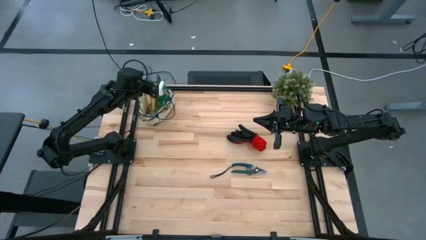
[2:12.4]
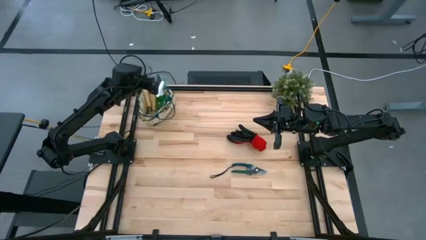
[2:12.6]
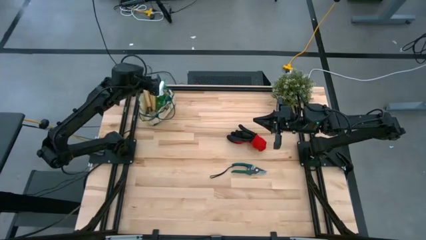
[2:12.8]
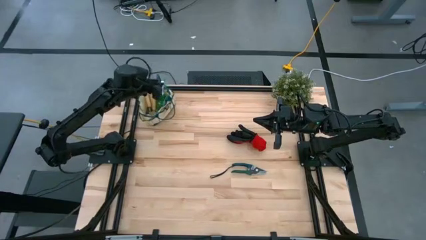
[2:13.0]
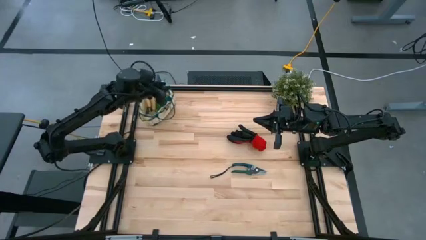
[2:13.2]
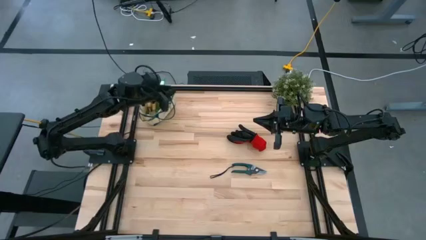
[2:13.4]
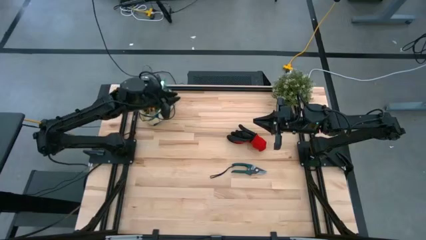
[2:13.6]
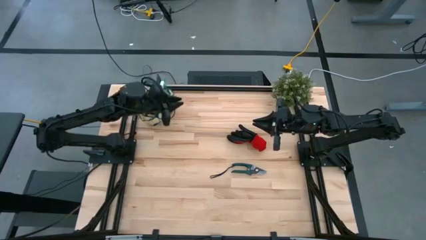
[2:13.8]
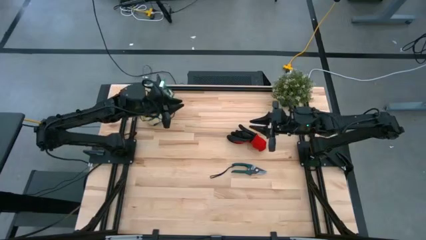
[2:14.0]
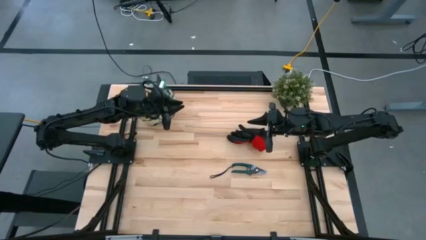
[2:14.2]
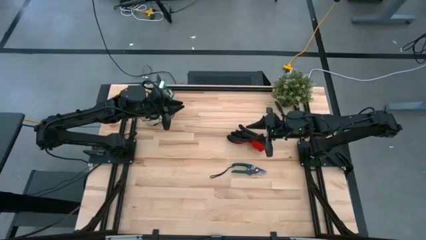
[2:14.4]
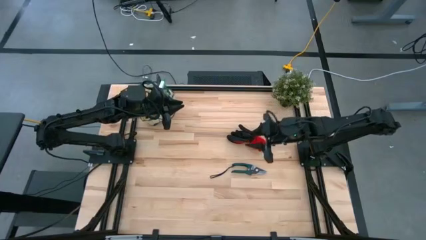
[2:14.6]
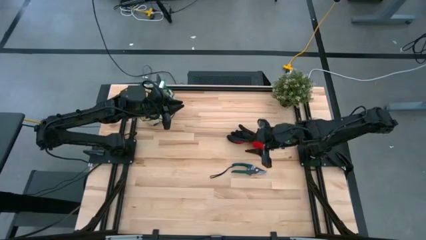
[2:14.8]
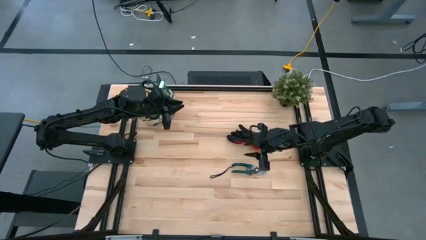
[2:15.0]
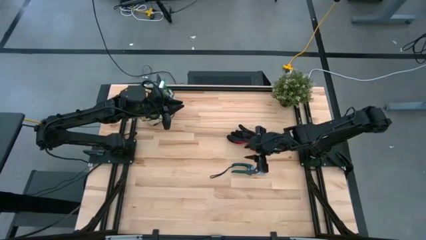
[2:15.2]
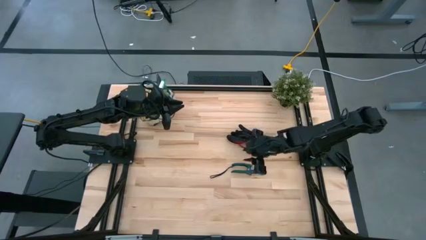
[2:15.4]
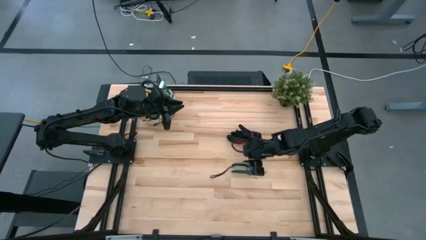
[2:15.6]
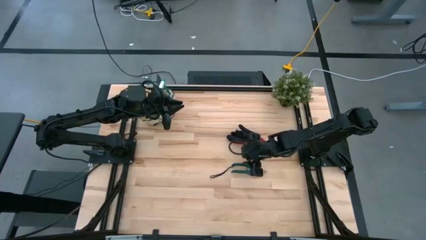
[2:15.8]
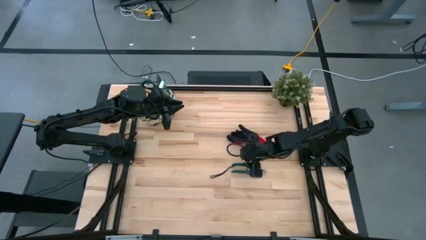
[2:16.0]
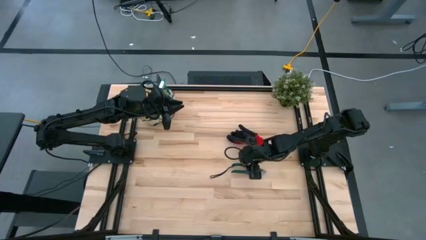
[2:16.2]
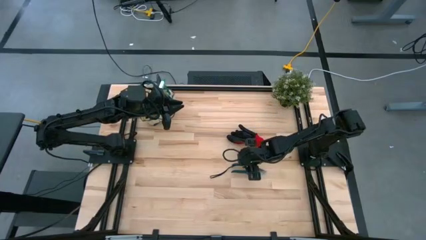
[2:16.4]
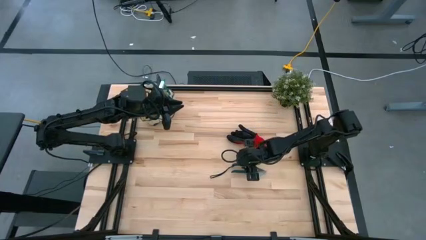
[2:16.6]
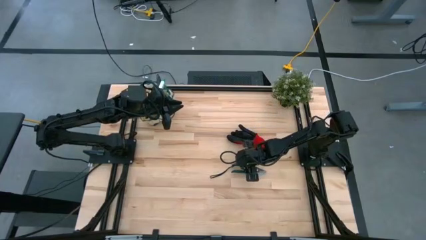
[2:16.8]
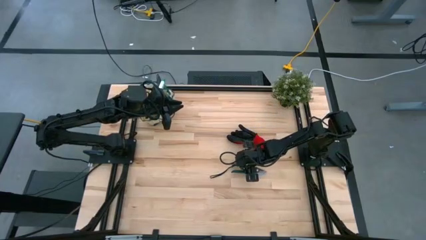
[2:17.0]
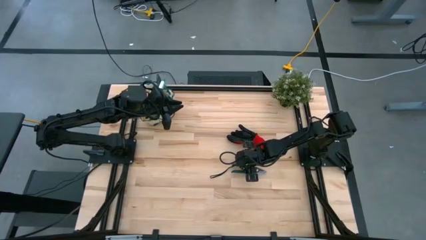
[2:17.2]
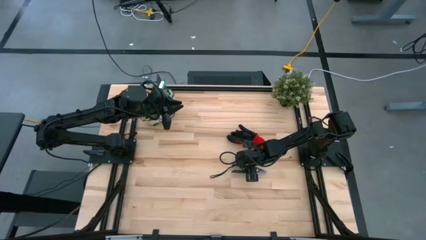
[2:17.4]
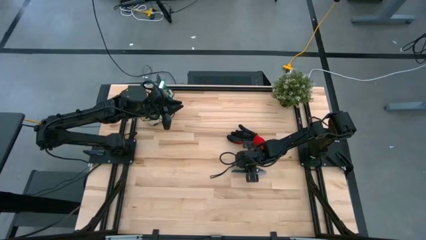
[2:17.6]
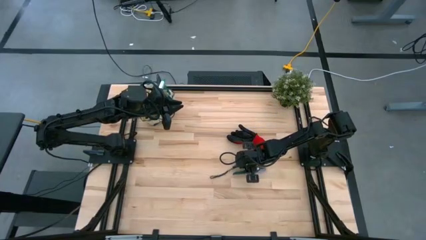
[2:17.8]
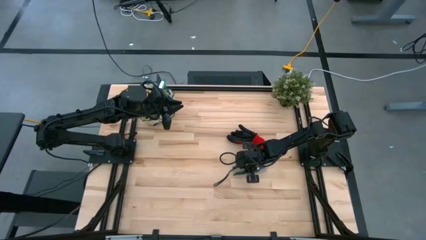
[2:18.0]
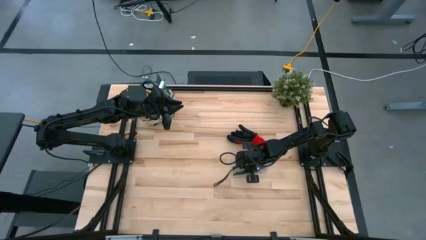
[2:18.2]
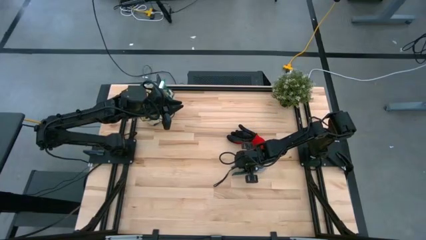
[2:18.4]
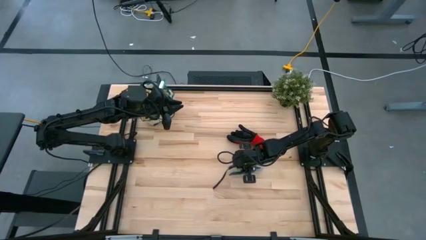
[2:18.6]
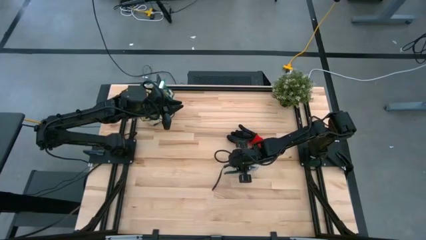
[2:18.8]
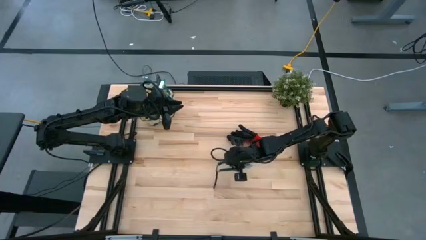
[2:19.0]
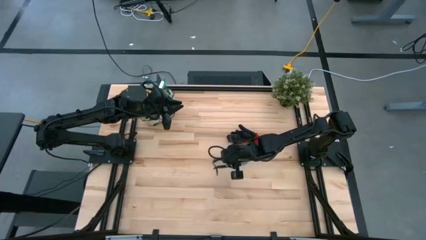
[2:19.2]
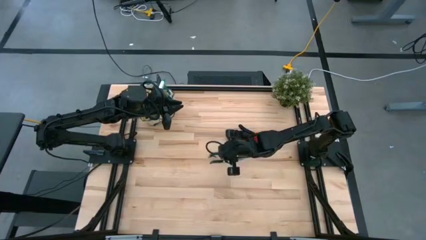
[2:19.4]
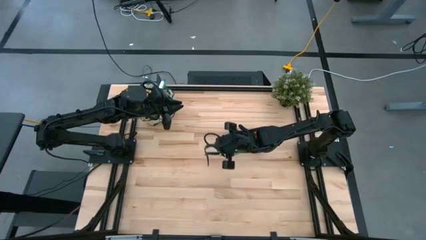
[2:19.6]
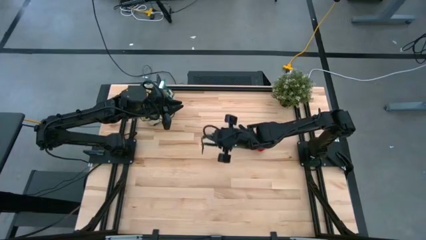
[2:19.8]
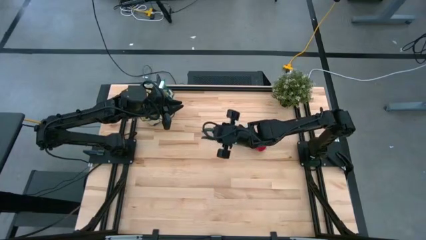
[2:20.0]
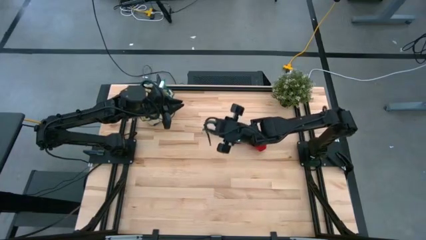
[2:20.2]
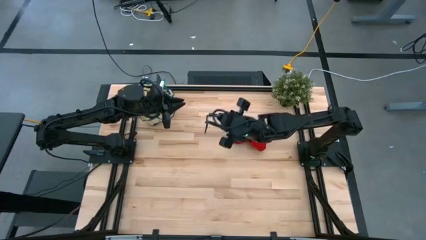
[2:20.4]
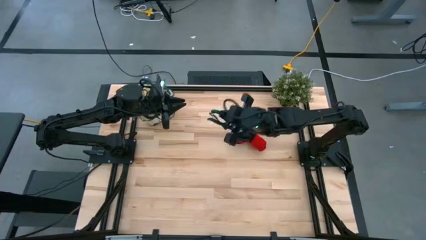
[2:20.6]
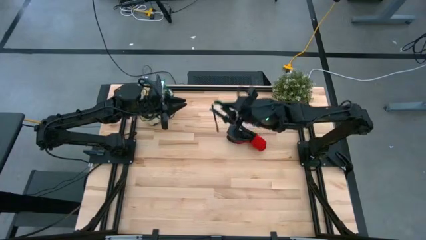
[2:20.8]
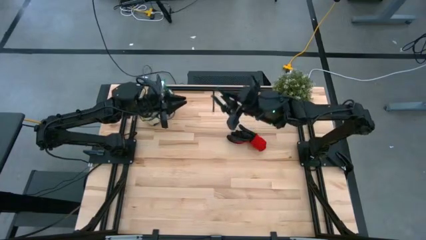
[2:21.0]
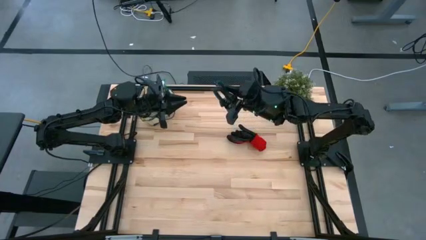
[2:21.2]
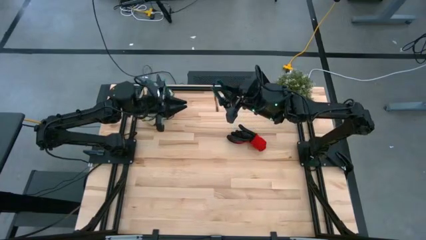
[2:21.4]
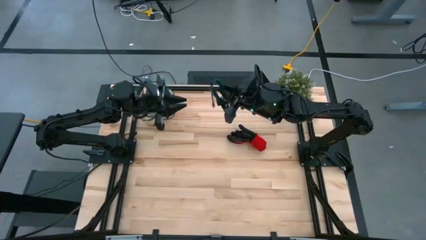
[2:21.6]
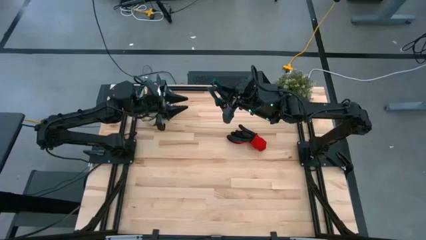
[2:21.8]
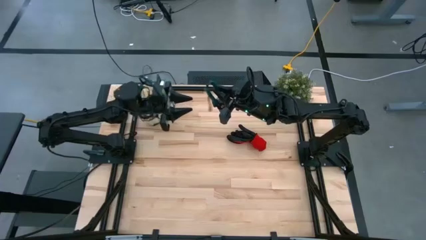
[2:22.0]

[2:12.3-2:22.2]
Task: Pick & Place Garden tools in Gardening bag
Put the green pruning shear into the gardening bag

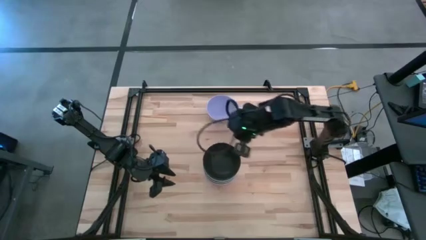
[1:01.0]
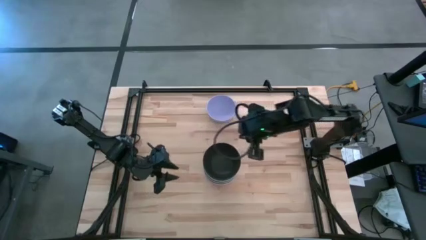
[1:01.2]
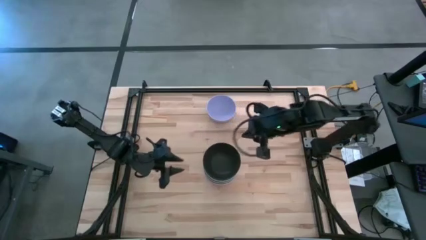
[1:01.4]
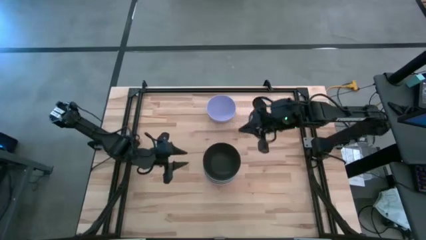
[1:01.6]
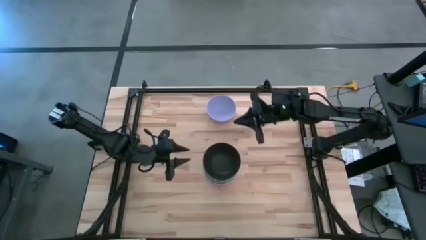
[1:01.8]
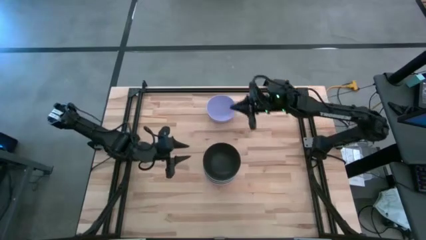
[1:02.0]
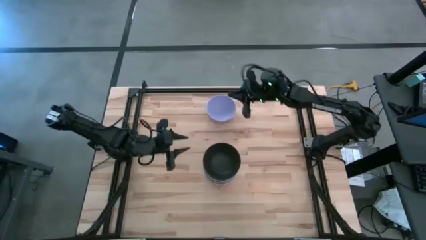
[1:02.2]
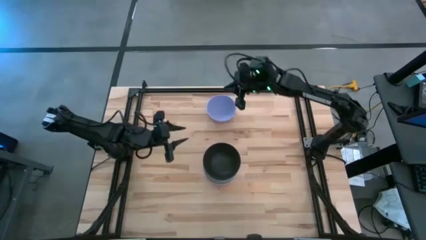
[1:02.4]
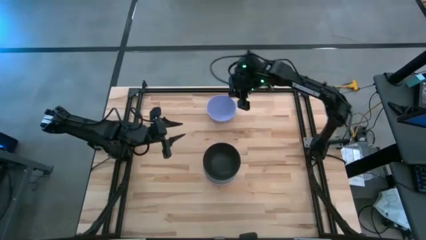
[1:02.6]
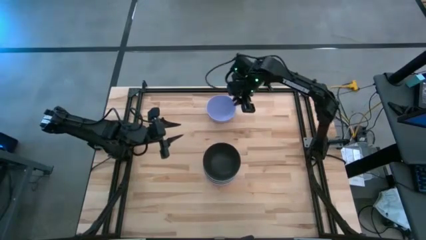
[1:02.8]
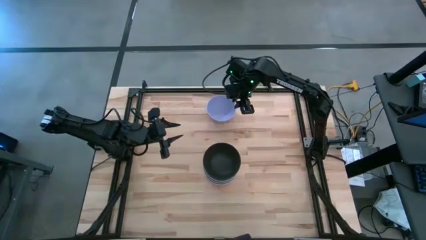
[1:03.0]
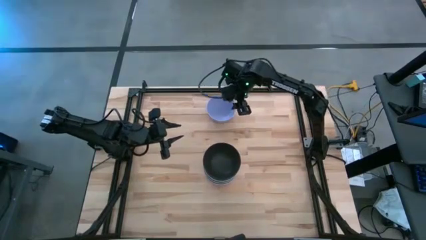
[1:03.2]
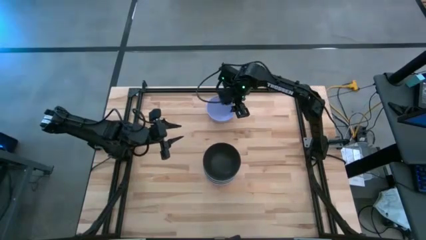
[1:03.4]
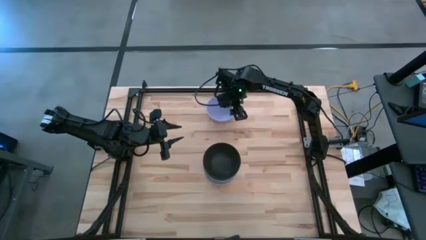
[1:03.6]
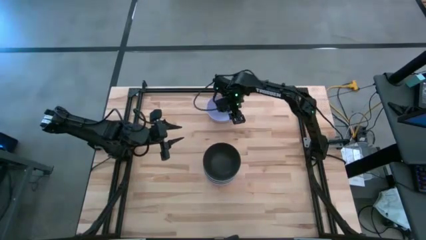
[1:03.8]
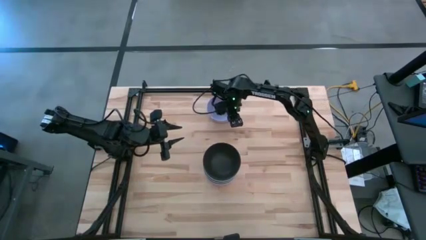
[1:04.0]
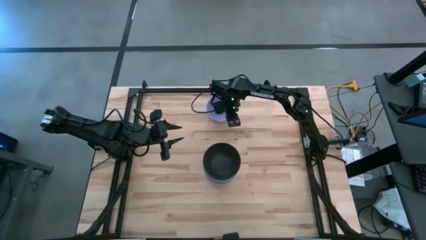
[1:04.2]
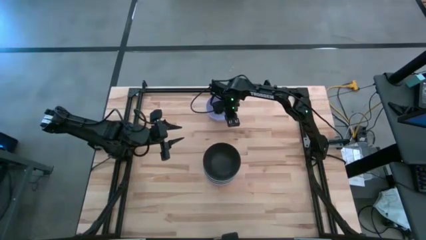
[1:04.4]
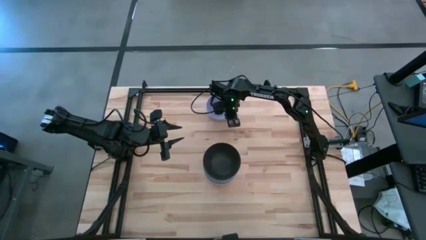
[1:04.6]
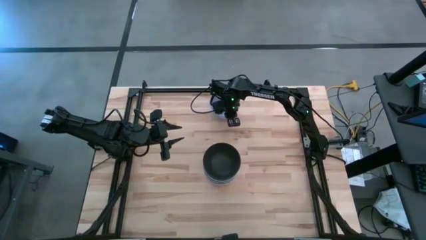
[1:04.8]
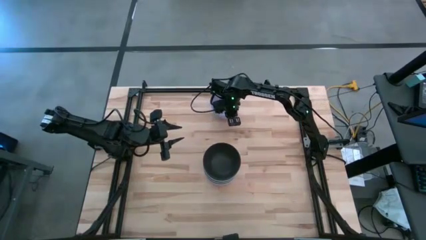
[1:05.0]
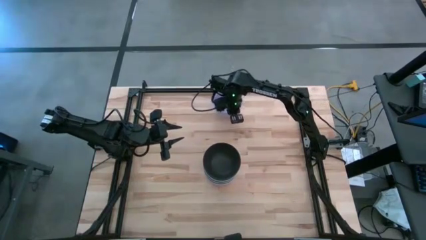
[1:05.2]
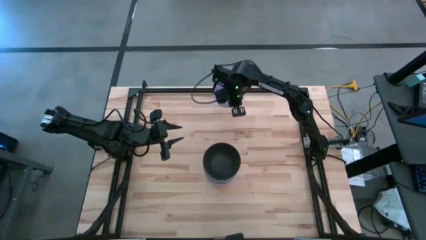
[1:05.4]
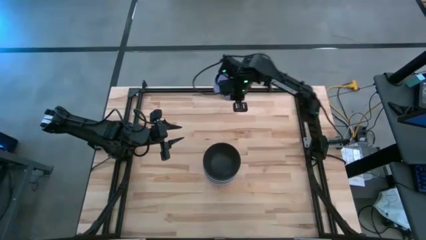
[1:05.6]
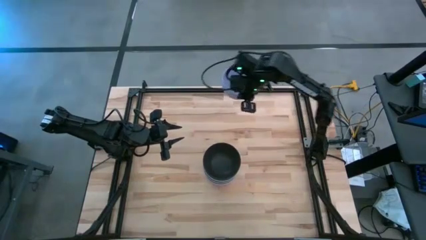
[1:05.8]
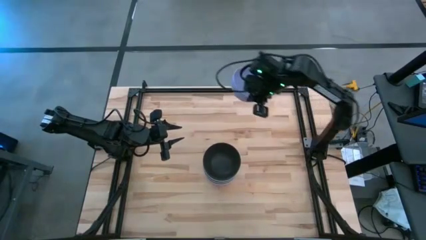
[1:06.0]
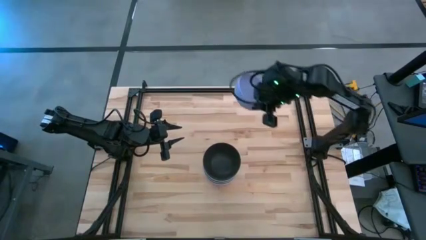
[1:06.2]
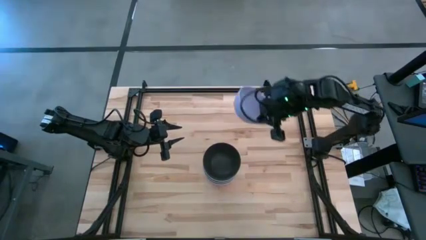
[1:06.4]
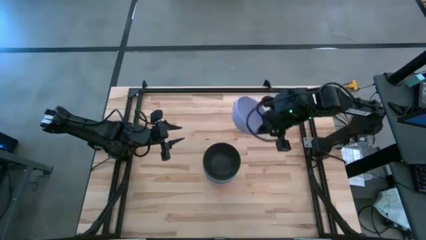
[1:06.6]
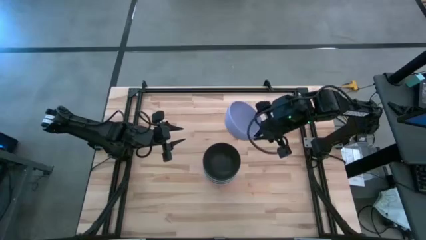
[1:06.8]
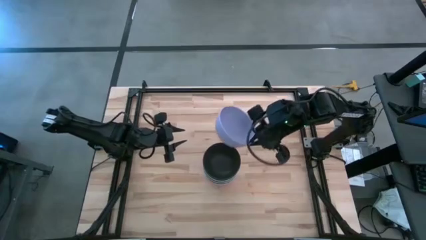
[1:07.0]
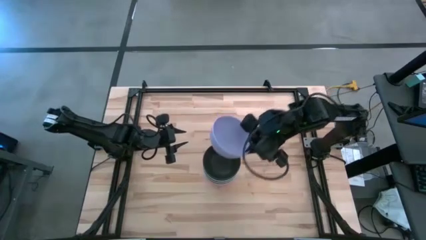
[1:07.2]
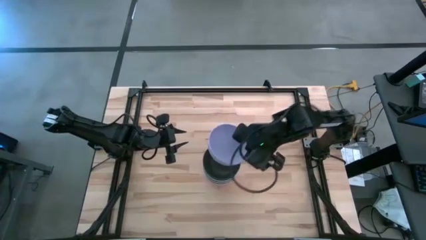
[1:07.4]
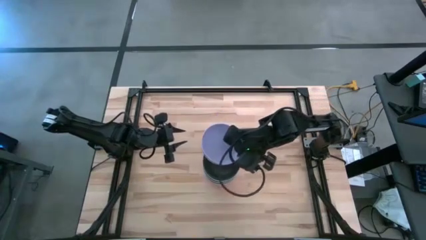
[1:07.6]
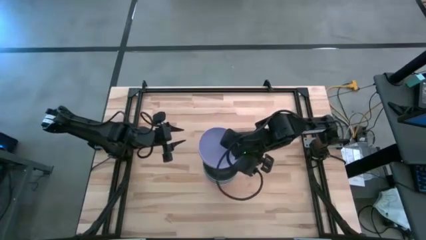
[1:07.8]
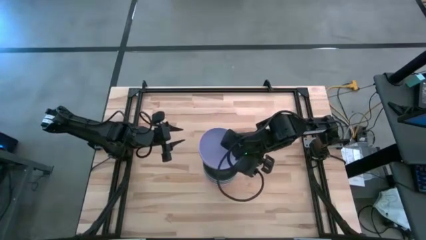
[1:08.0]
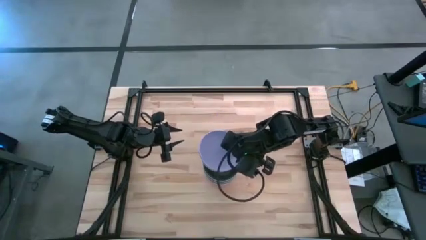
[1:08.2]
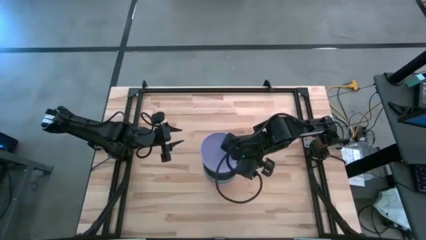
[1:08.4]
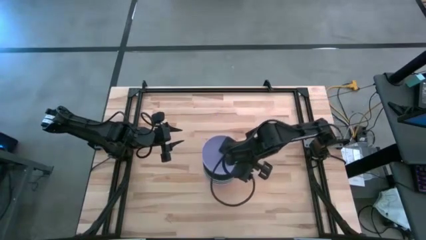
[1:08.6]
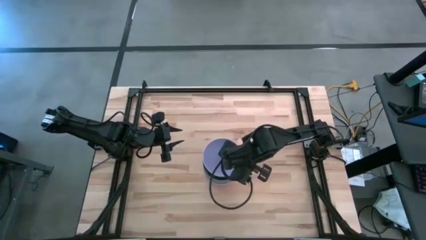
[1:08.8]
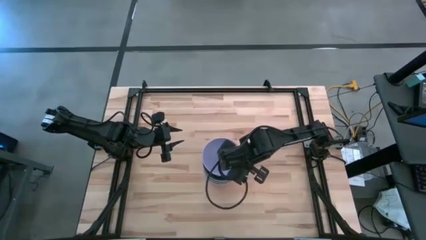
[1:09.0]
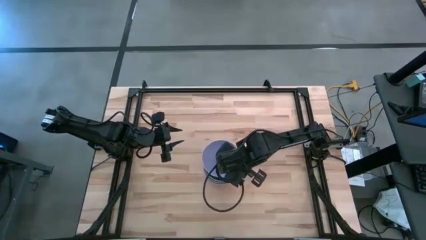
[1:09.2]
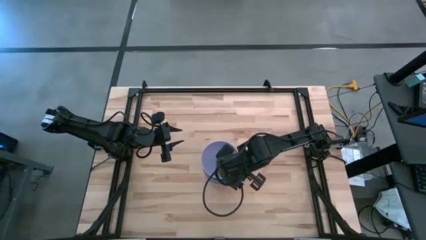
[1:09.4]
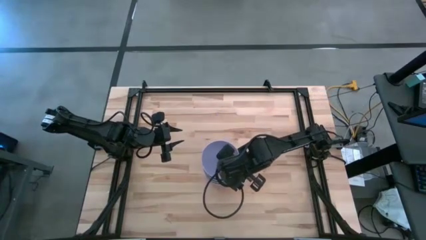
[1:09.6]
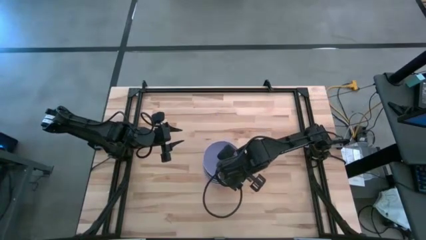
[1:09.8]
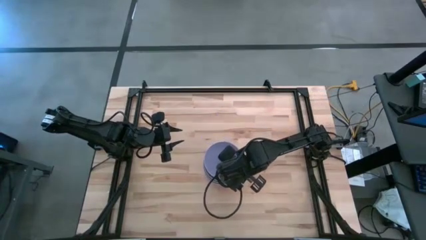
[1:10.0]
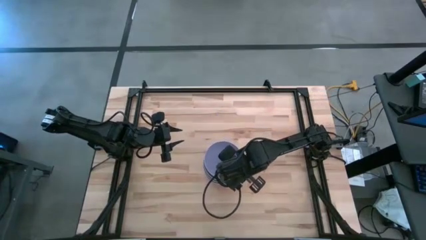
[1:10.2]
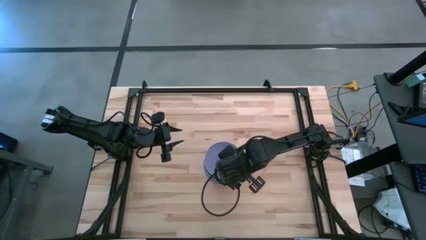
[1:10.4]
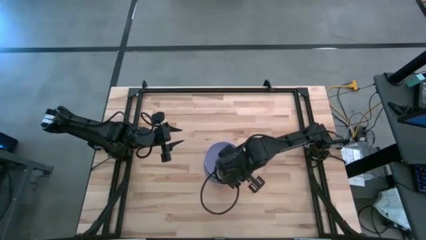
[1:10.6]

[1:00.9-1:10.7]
Task: Nest bowls inside each other
Stack the purple bowl on top of the black bowl
